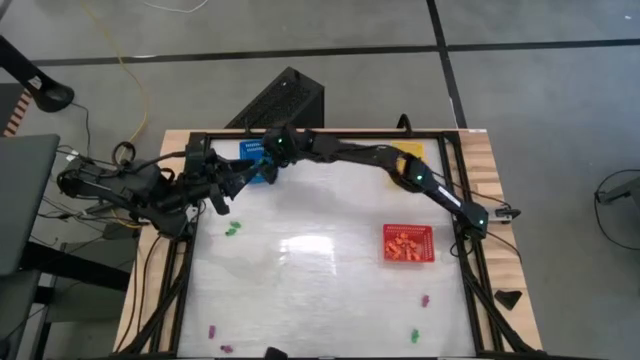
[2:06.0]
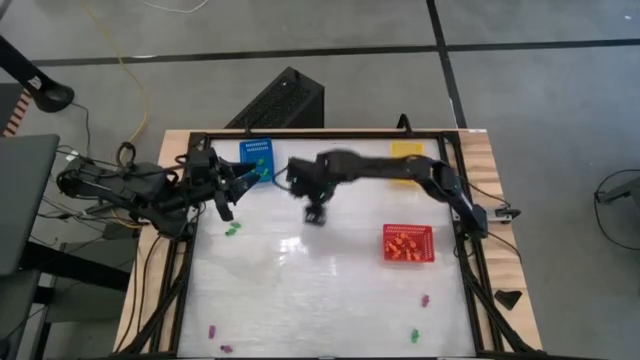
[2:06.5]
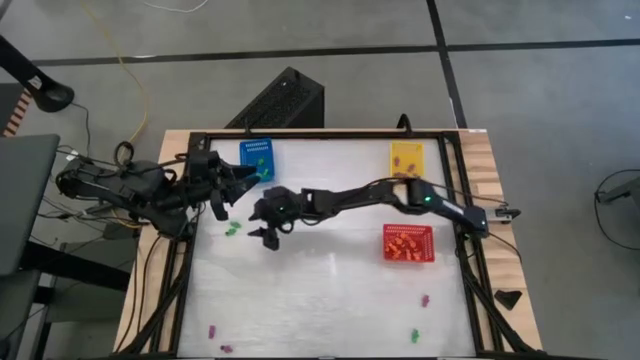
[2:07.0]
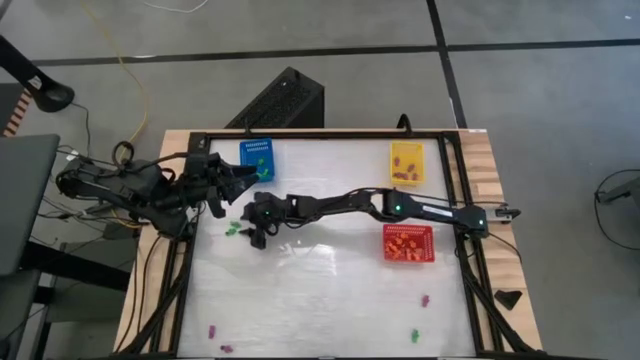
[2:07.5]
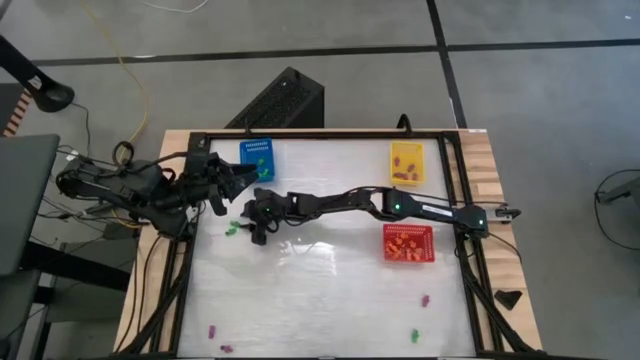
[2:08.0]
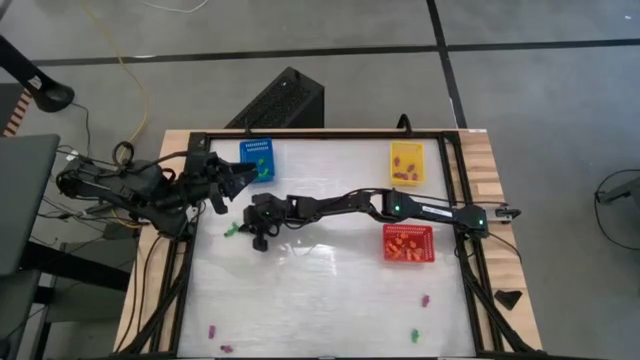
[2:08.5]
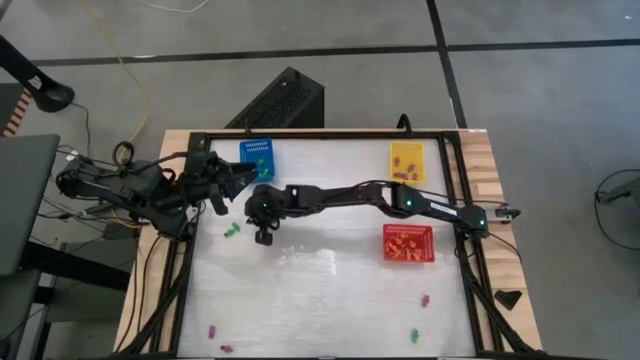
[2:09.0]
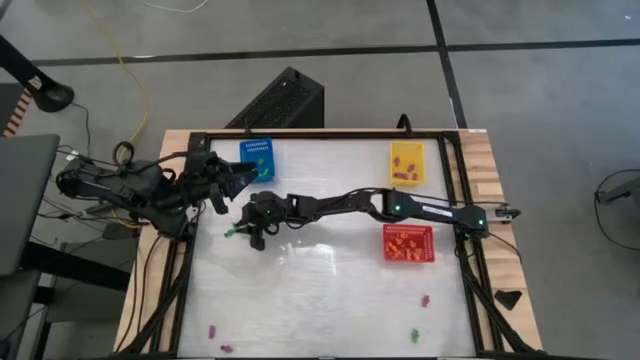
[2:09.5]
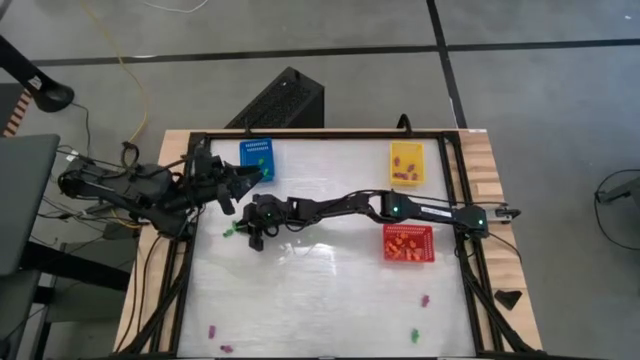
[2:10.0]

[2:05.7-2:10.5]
Task: Sort Halloween decoration
Put the green skeleton toy into the blue bin

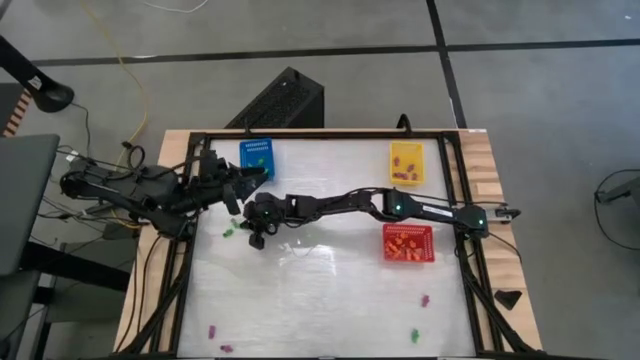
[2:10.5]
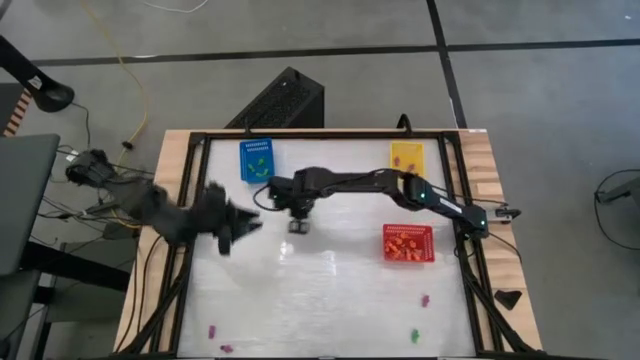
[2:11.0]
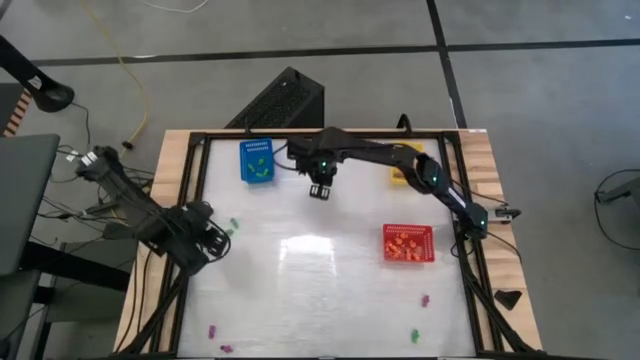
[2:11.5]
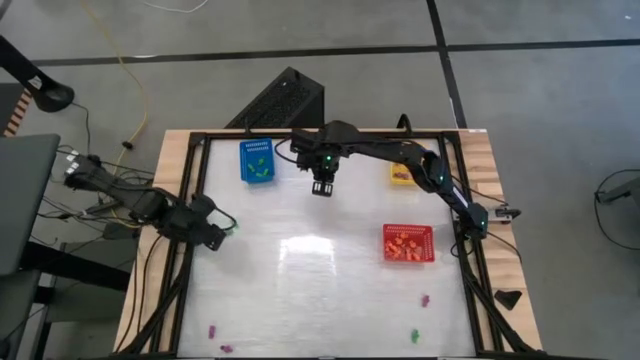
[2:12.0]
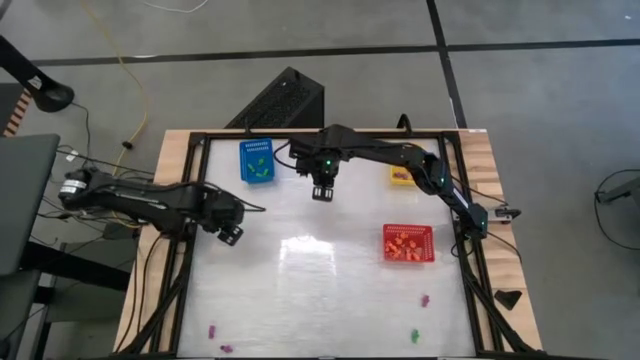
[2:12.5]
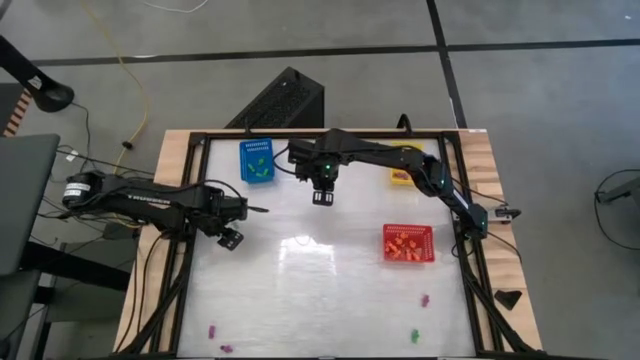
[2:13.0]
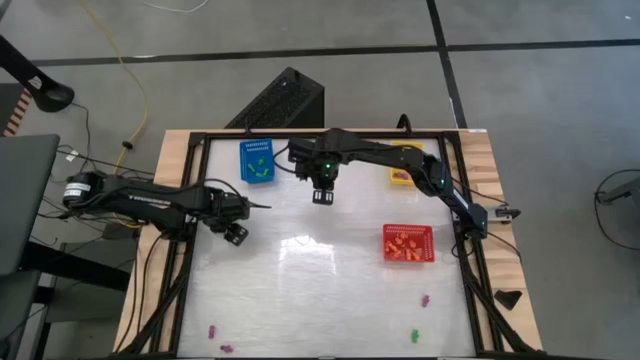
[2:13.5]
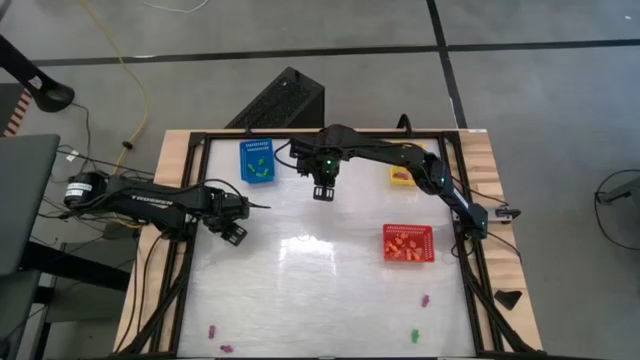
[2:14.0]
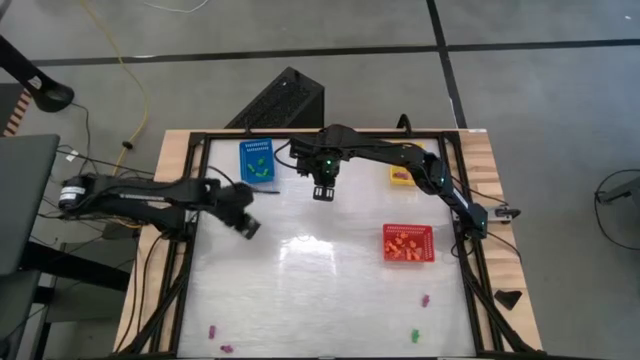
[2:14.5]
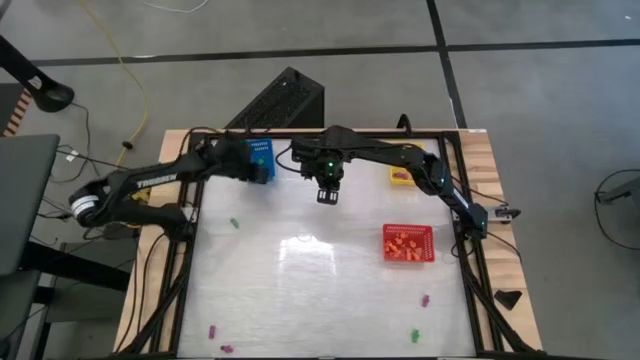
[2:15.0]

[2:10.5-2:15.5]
Put the green skeleton toy into the blue bin

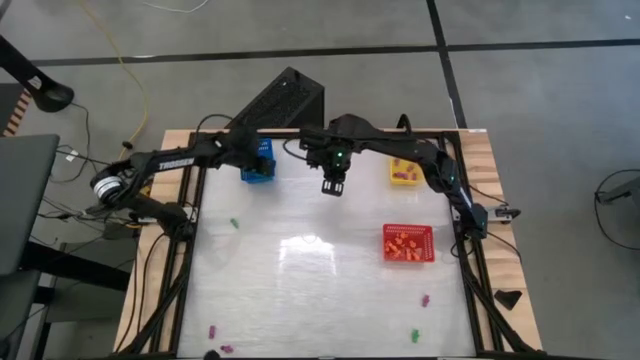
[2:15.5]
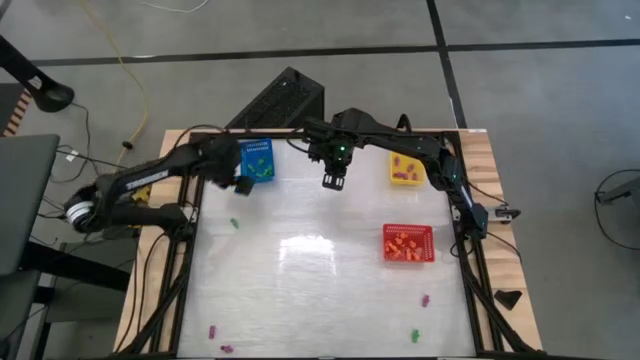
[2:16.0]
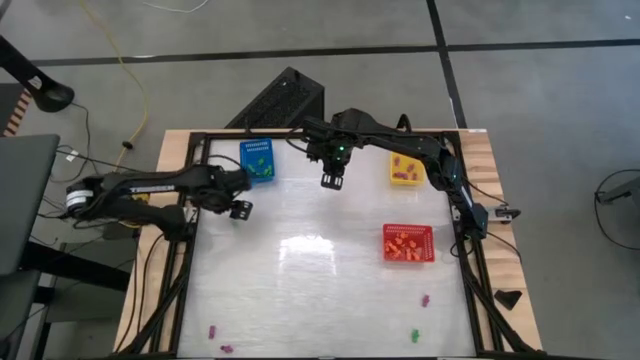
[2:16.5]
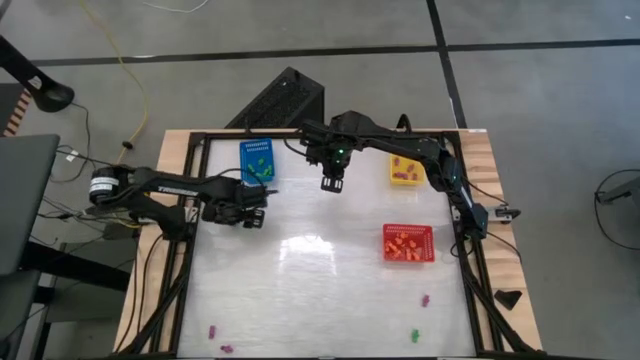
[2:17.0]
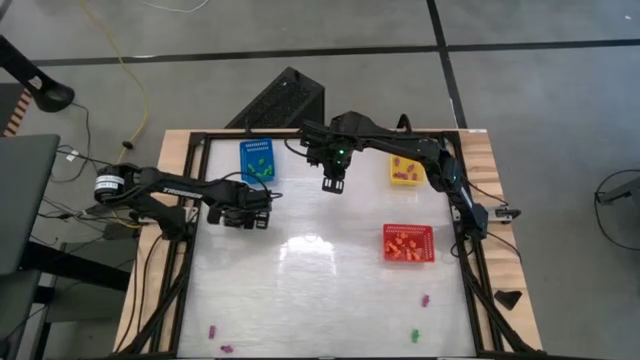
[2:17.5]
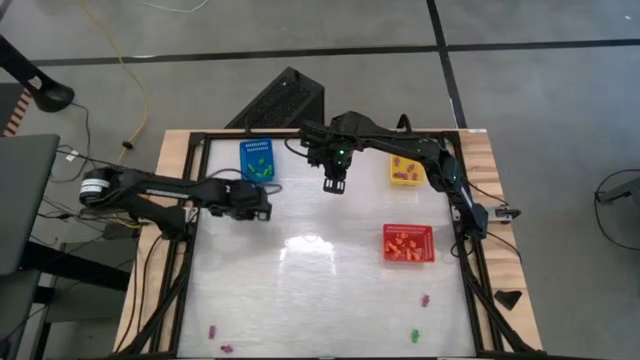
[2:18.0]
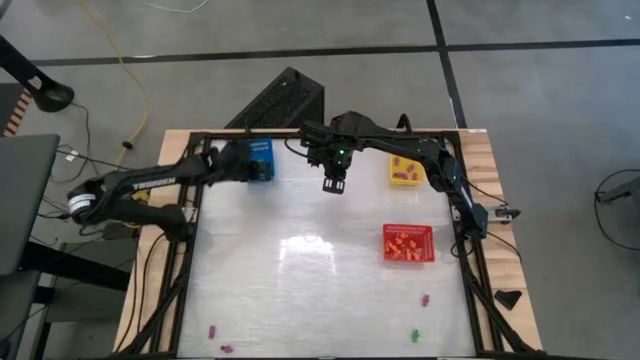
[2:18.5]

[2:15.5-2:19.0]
Put the green skeleton toy into the blue bin

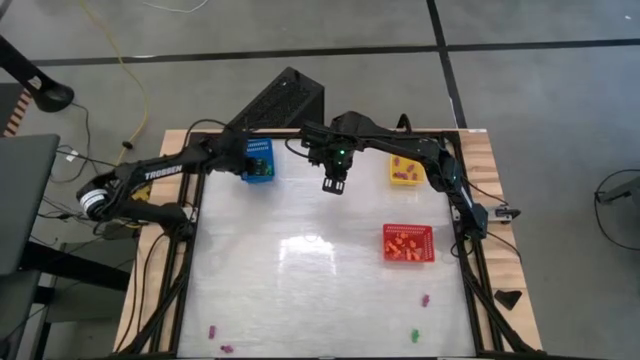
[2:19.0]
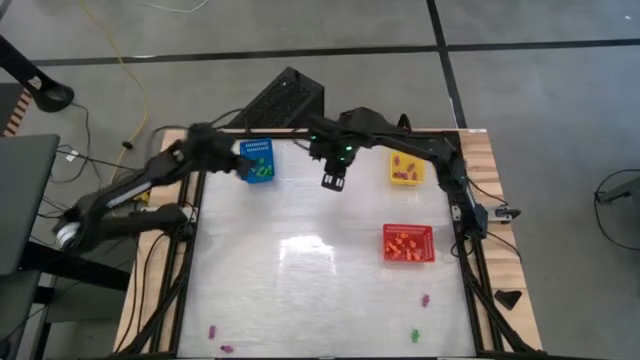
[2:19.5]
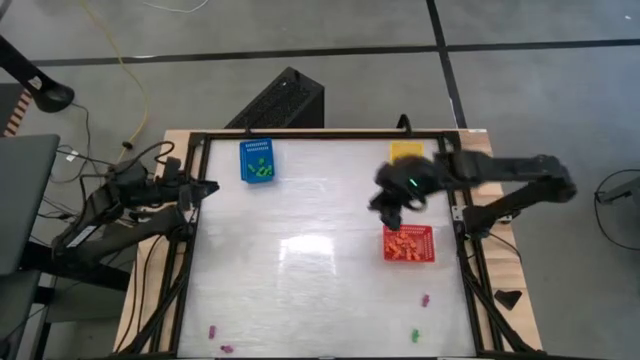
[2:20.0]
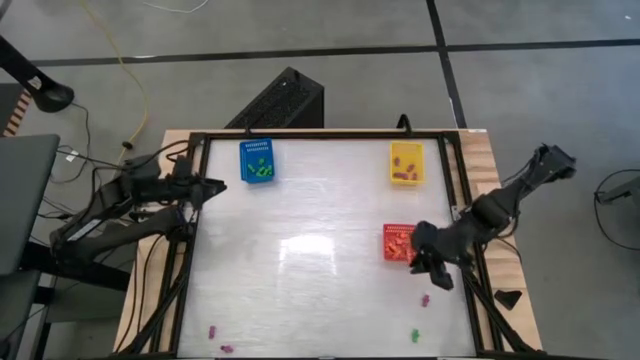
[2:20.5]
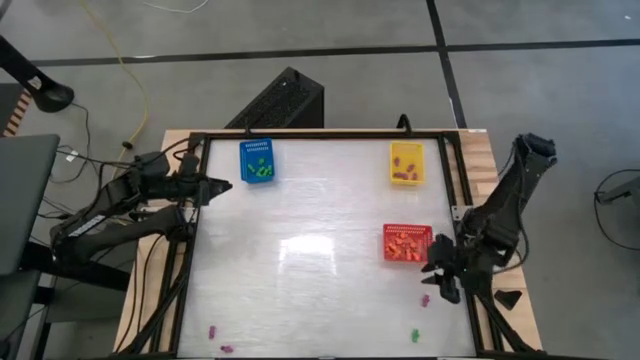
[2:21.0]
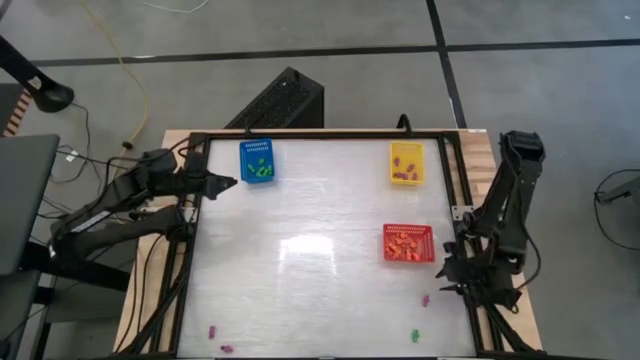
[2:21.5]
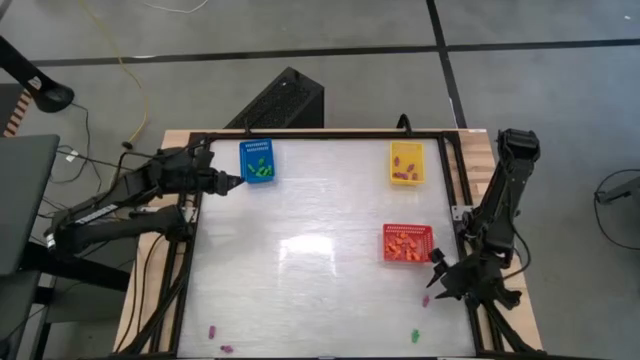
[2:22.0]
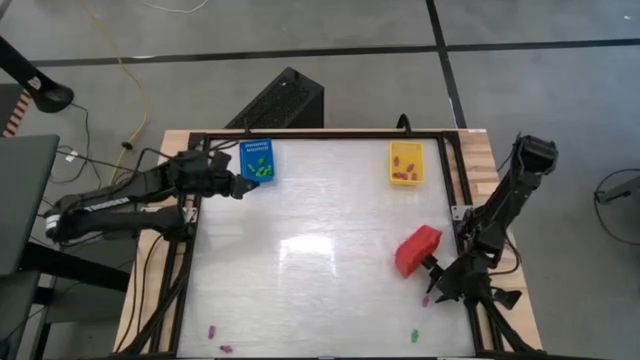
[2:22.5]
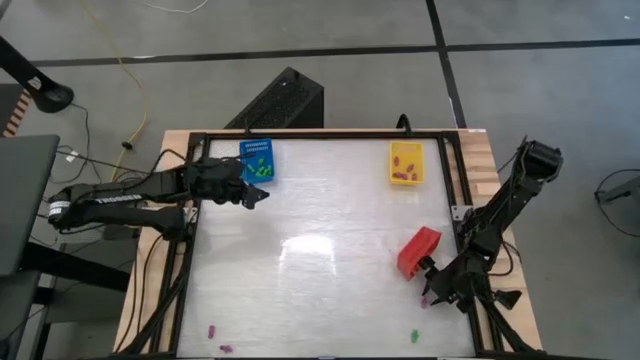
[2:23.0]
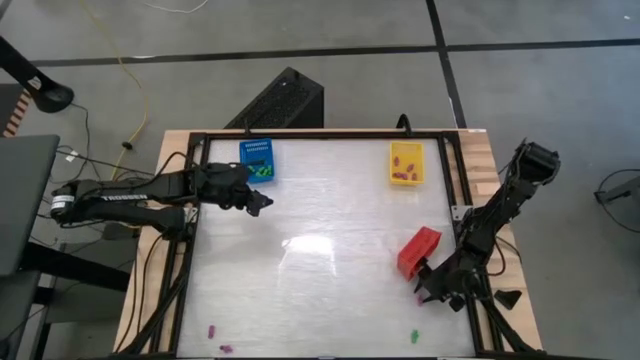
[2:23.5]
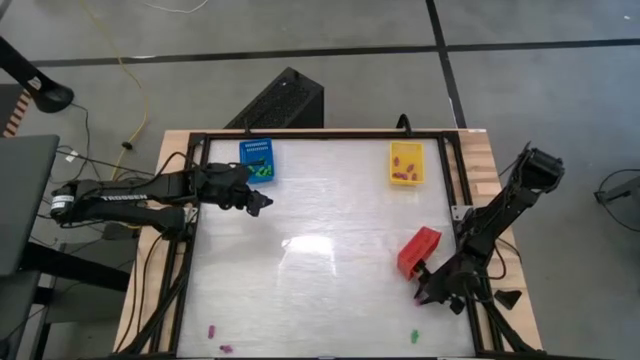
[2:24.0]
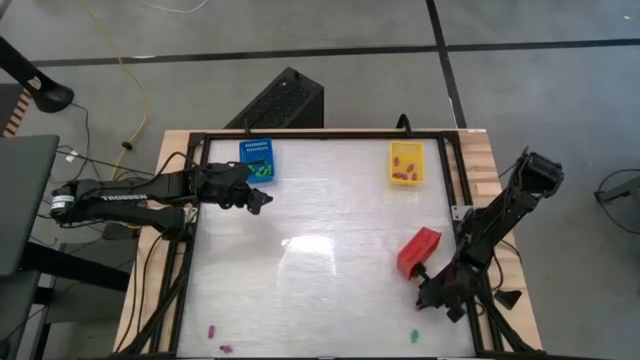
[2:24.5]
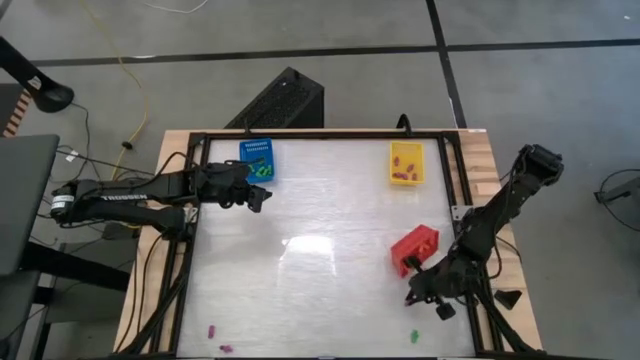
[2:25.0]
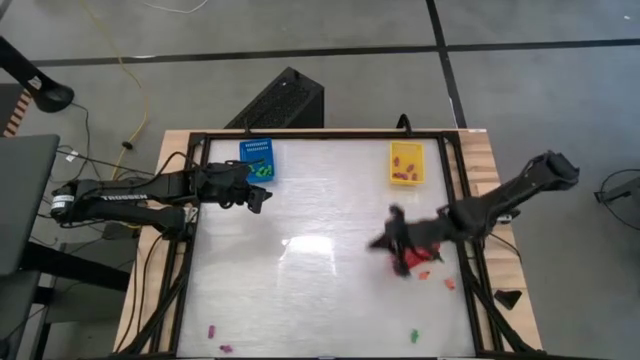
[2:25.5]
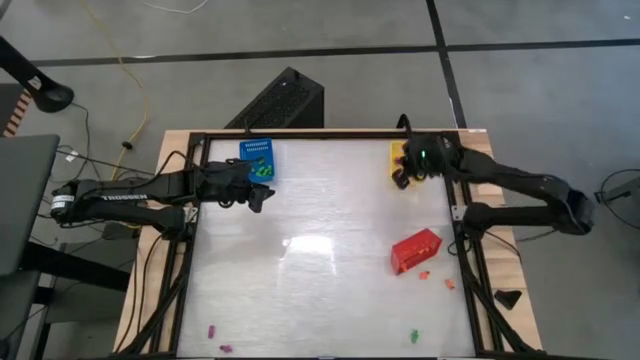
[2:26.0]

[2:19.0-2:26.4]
Put the purple skeleton toy into the yellow bin

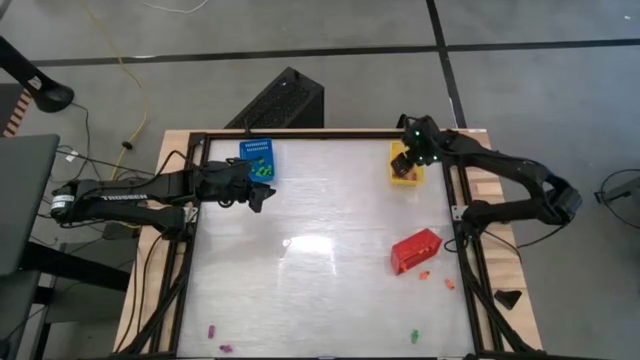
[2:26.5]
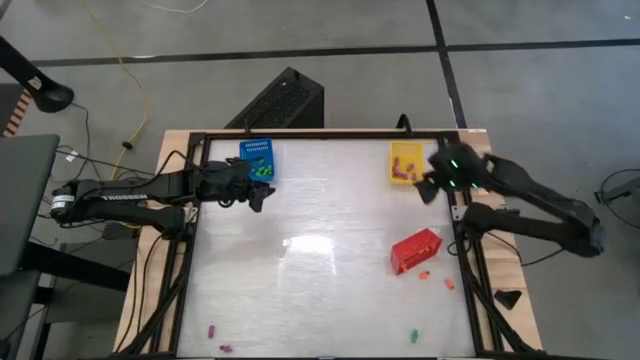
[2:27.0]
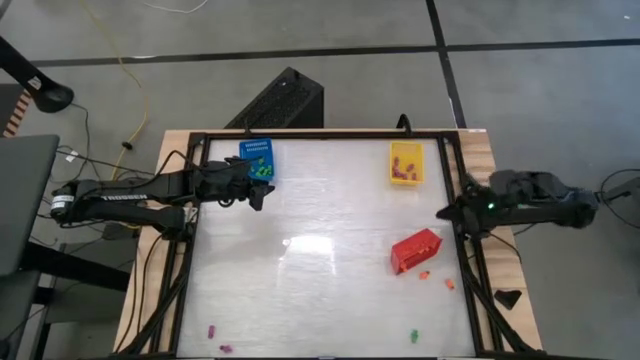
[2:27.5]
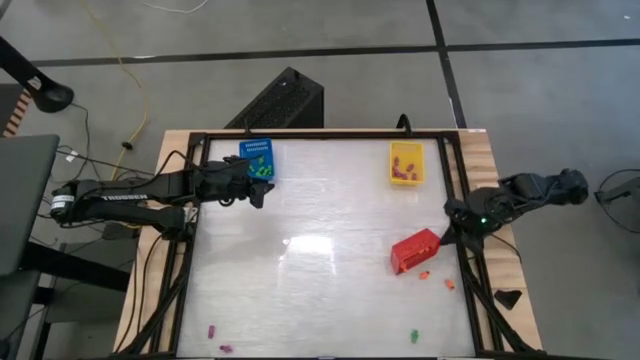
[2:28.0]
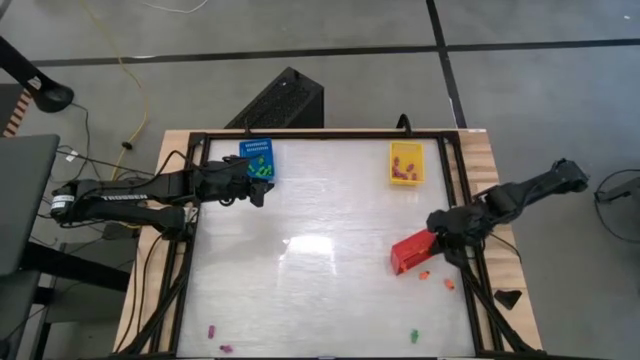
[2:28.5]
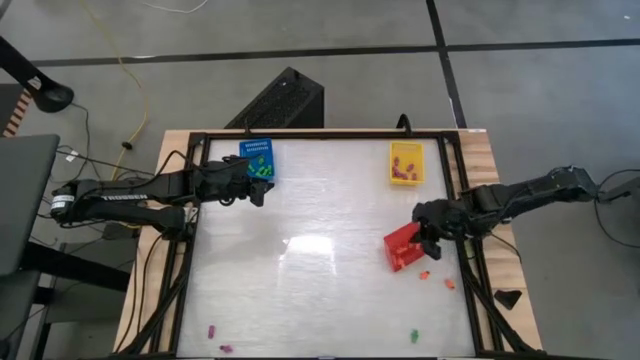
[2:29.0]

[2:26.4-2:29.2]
Adjust the red bin
